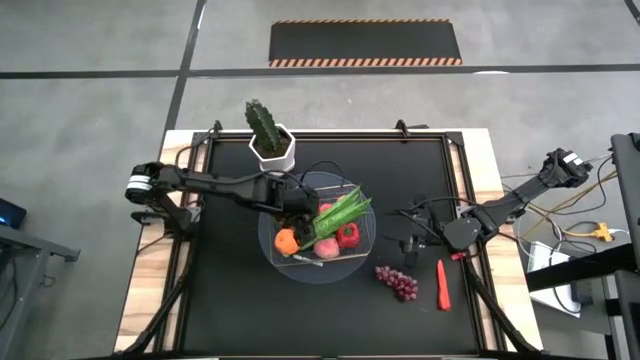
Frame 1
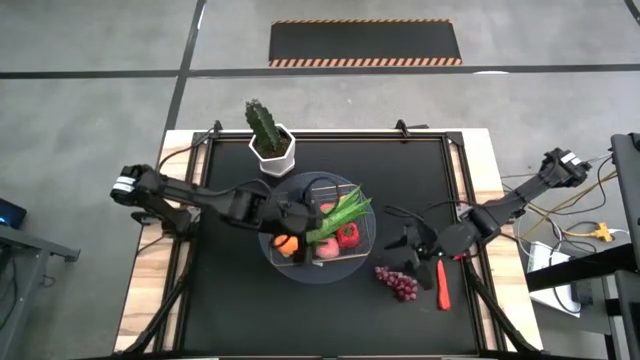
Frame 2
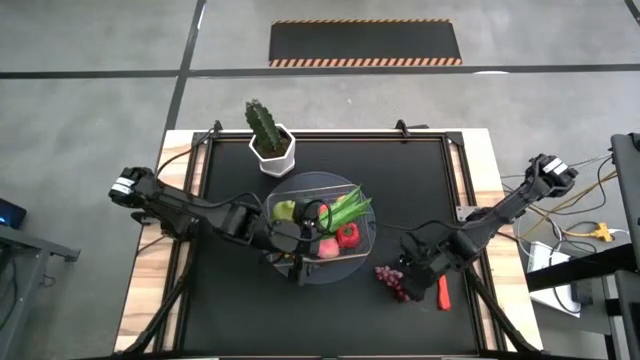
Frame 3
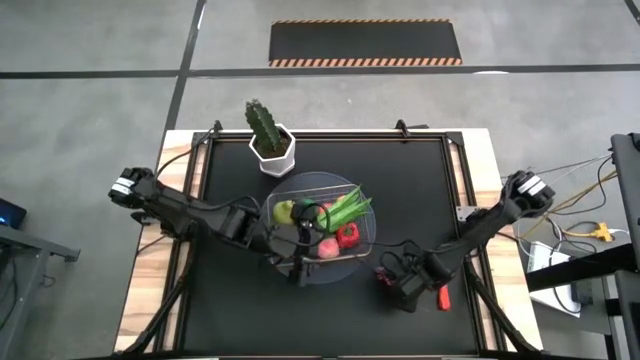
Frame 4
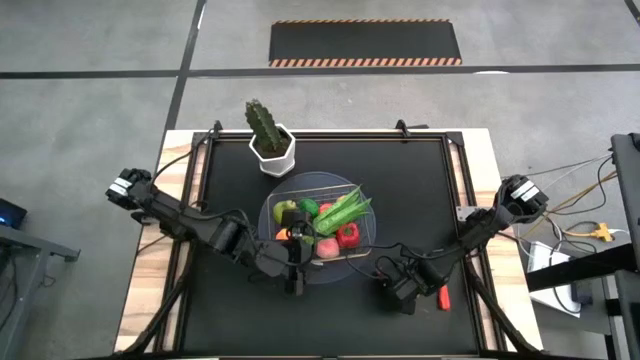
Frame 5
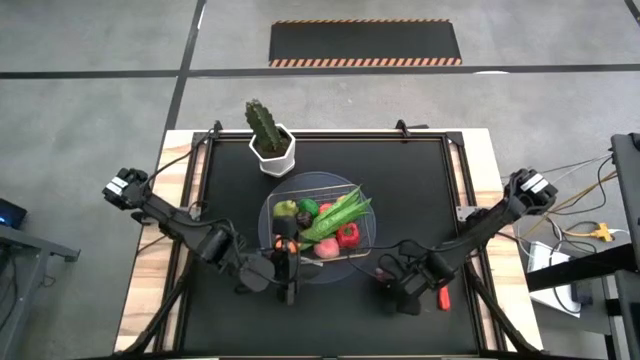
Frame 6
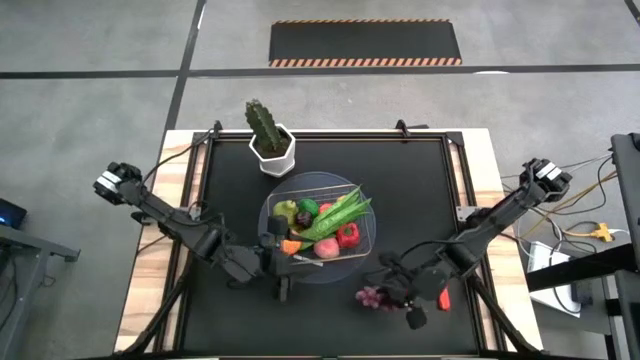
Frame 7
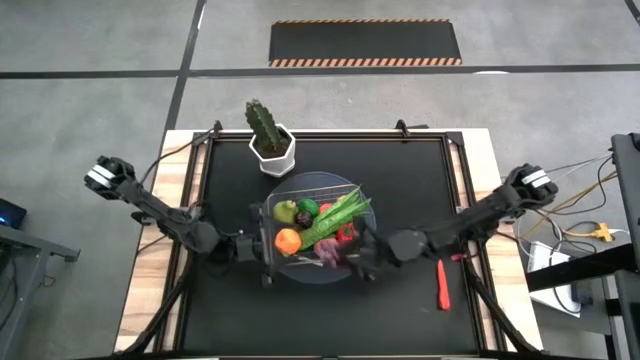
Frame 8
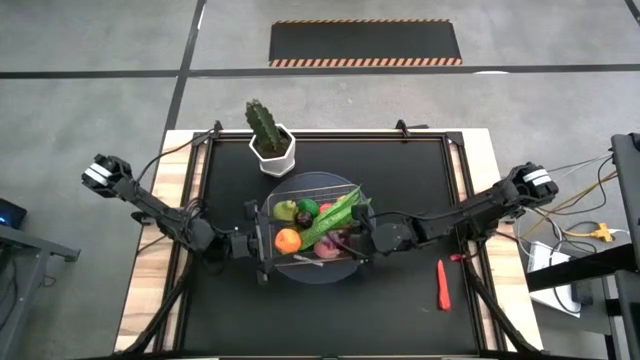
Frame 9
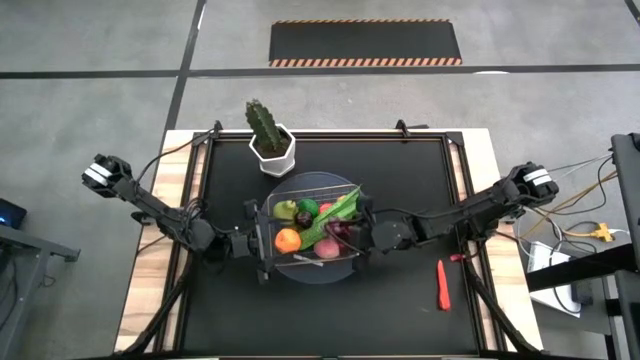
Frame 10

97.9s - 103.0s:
Task: Build produce basket
Put the grapes into the wire basket

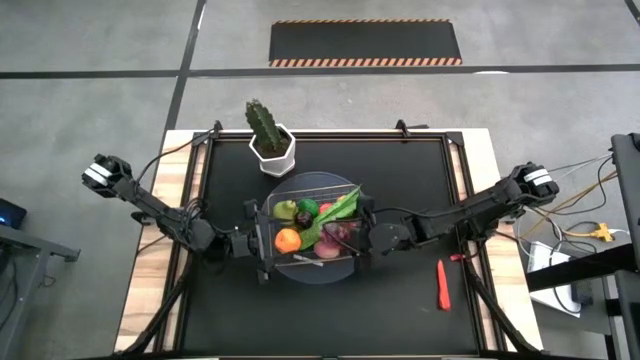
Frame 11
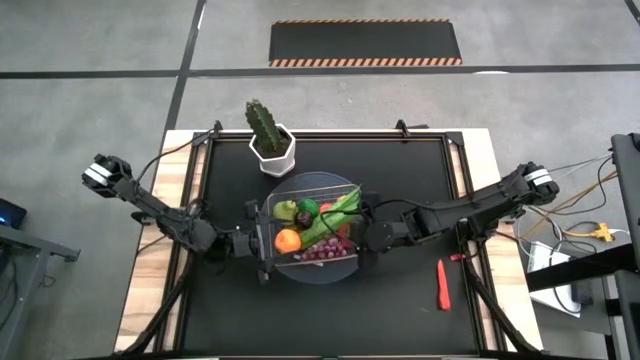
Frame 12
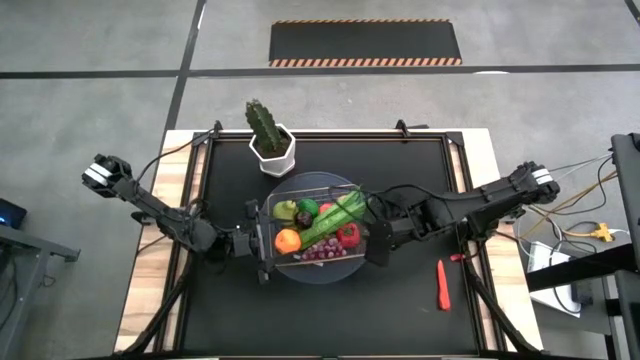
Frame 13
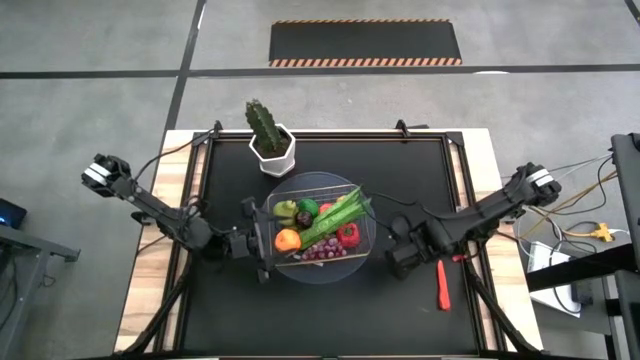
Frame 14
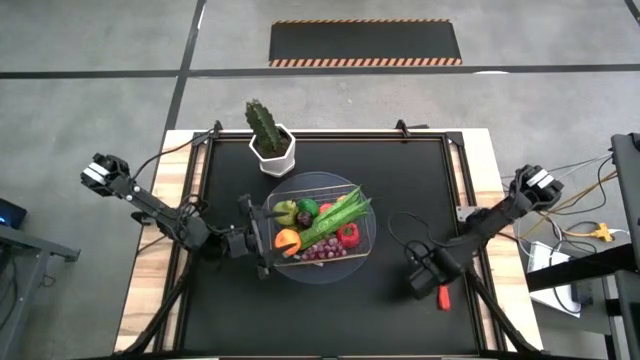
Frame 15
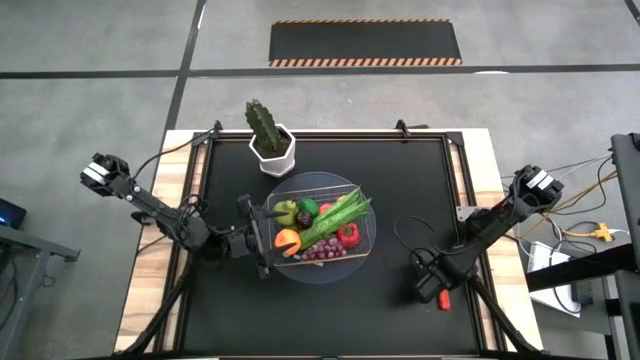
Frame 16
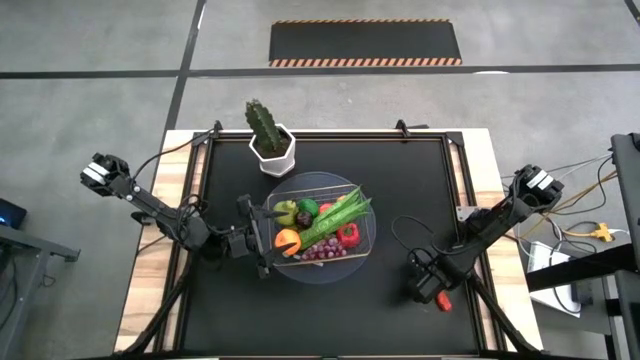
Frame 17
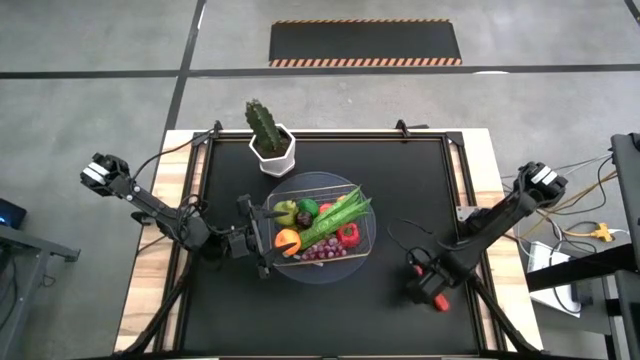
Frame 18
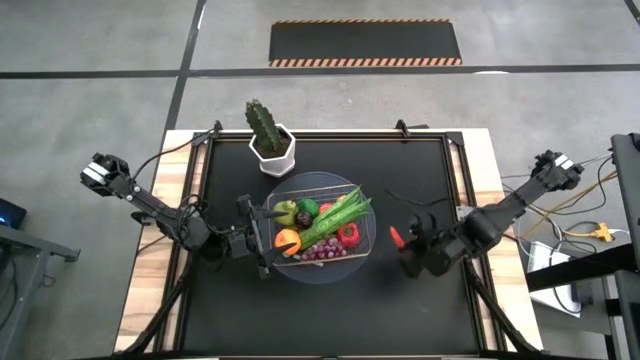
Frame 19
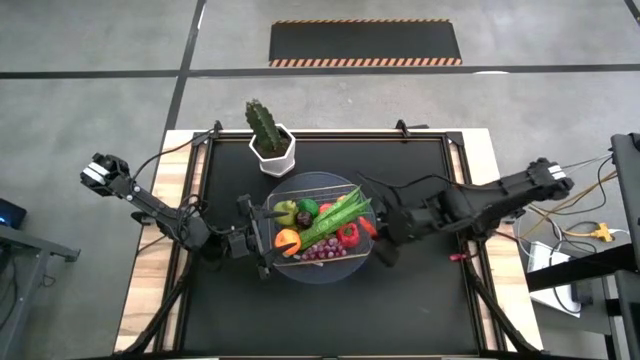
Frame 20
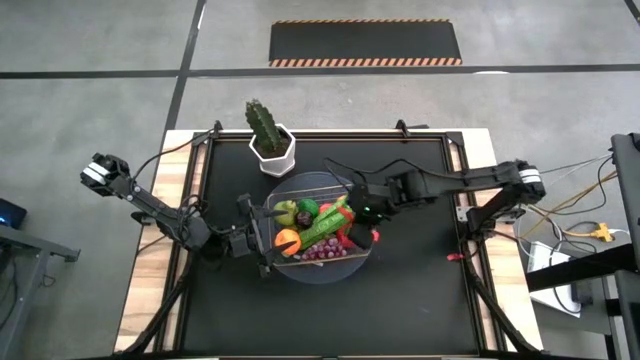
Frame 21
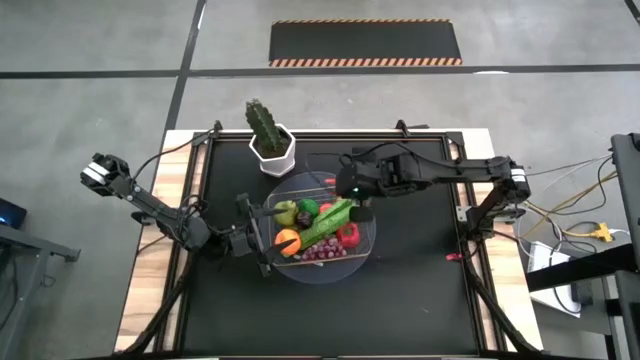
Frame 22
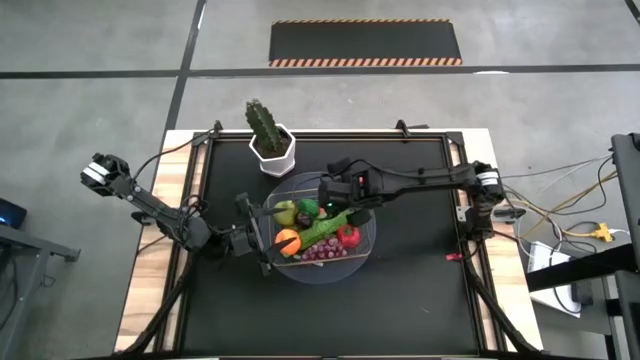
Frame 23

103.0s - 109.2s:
Put the carrot into the wire basket

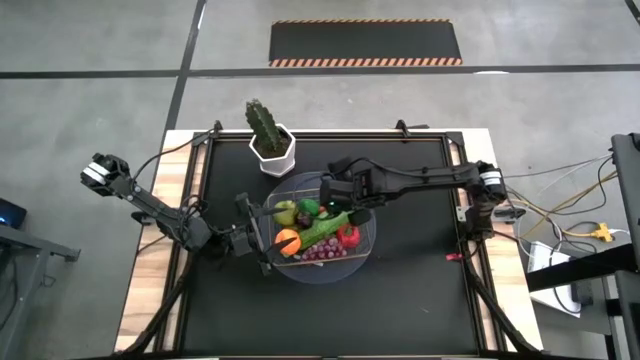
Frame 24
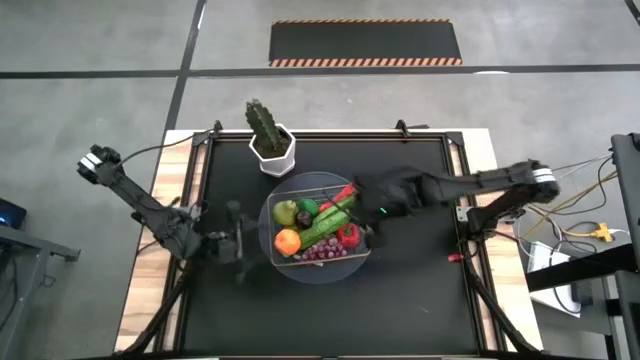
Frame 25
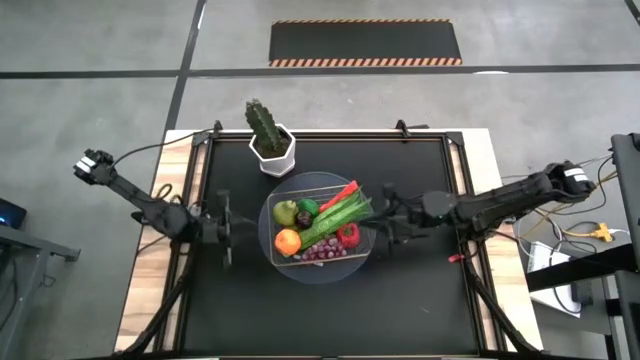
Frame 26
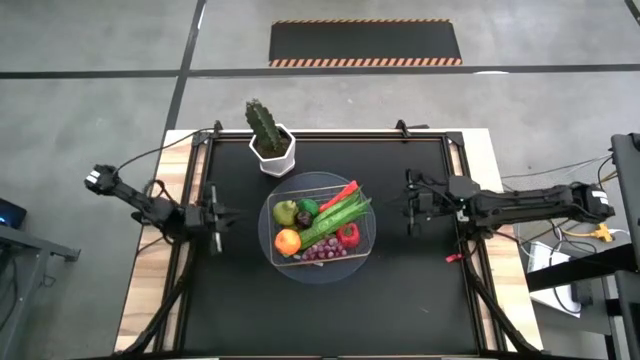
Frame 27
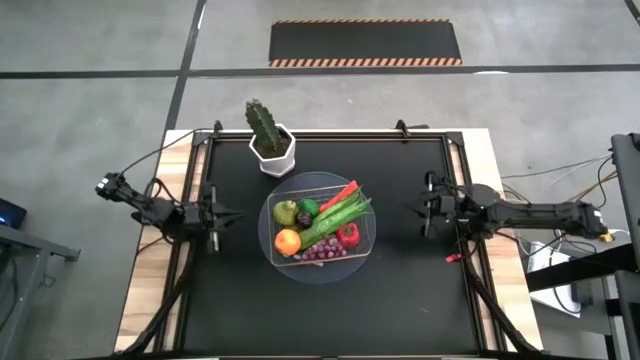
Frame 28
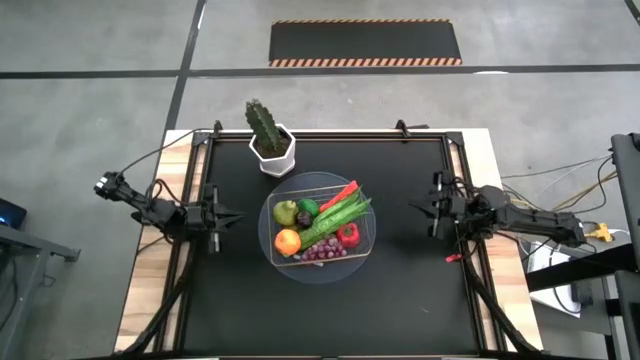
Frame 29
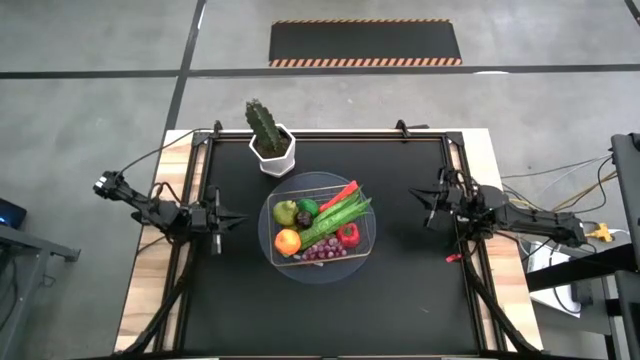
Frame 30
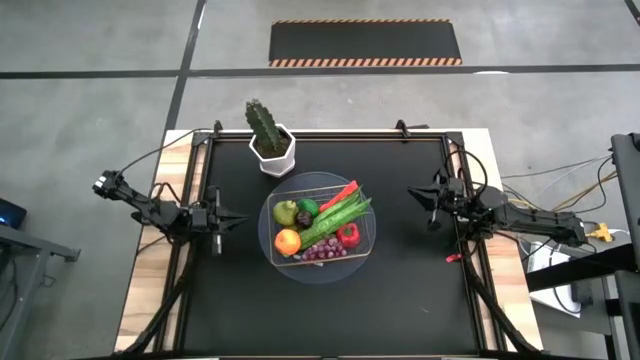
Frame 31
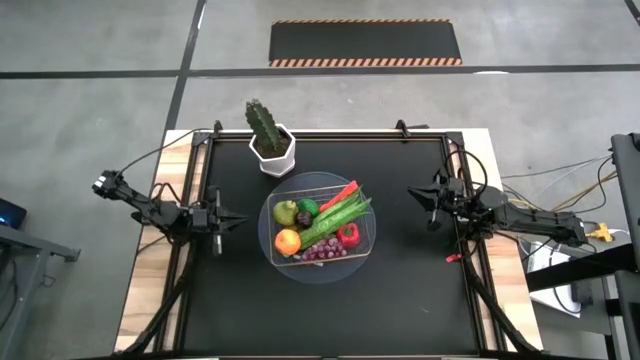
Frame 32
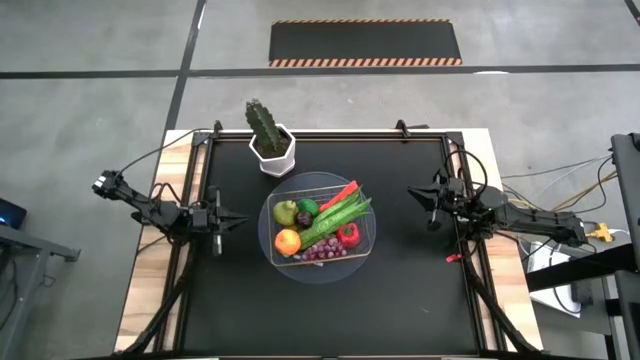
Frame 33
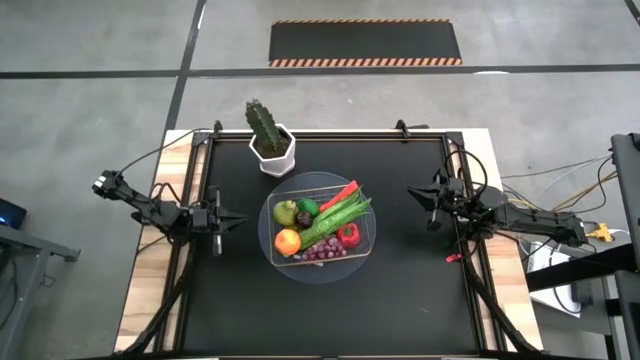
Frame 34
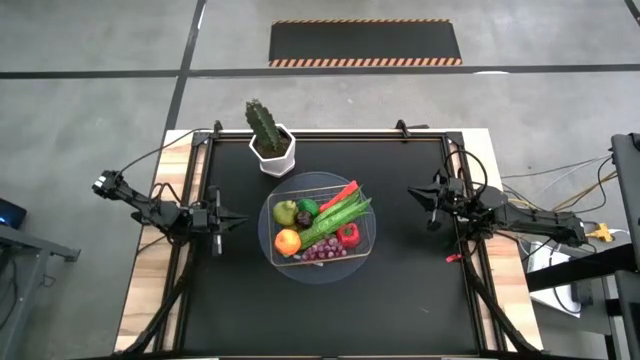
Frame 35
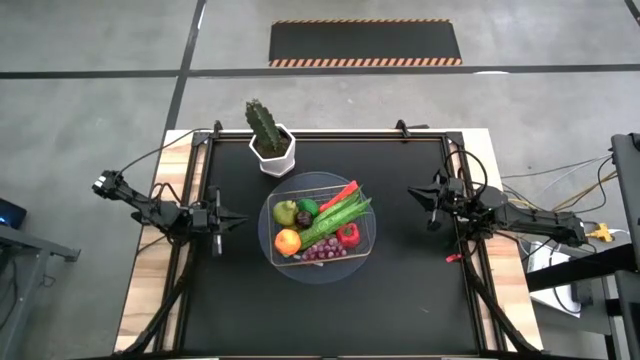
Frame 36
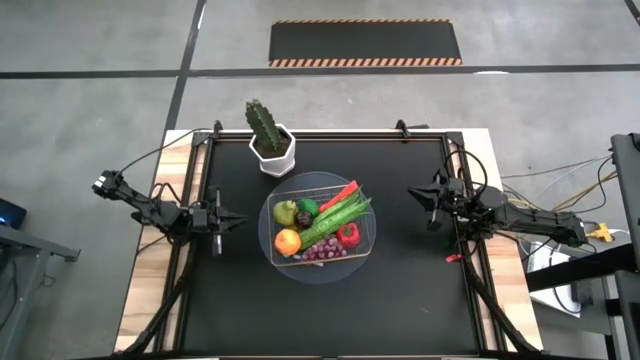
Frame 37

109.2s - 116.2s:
Return to Home Position

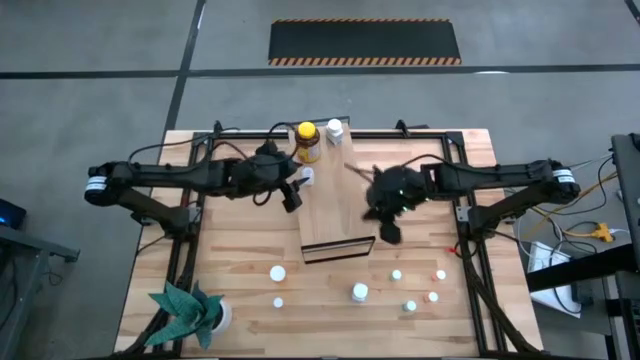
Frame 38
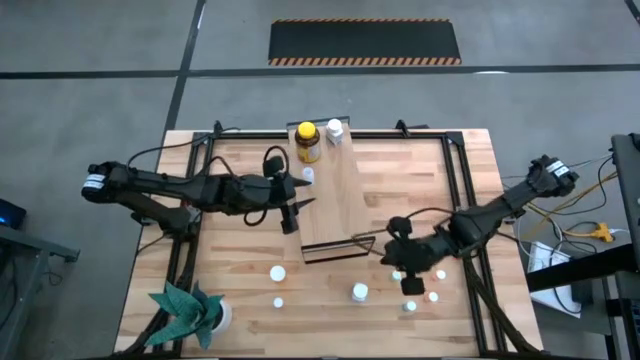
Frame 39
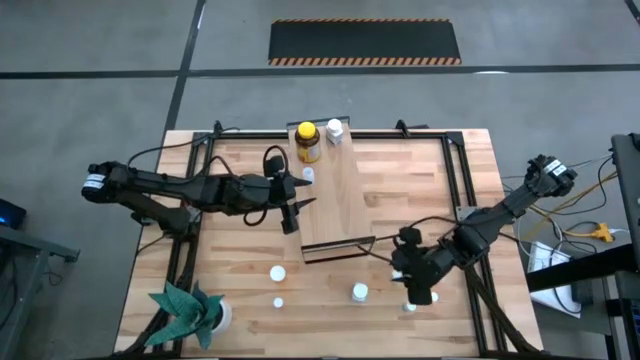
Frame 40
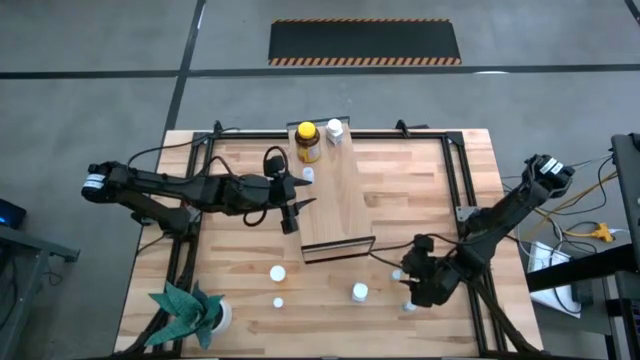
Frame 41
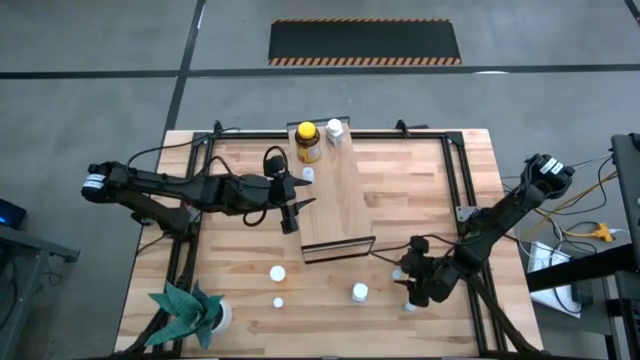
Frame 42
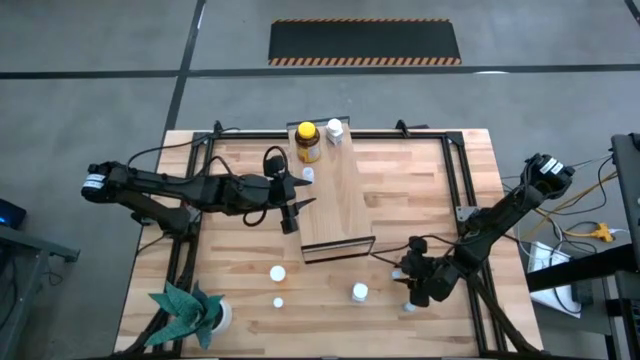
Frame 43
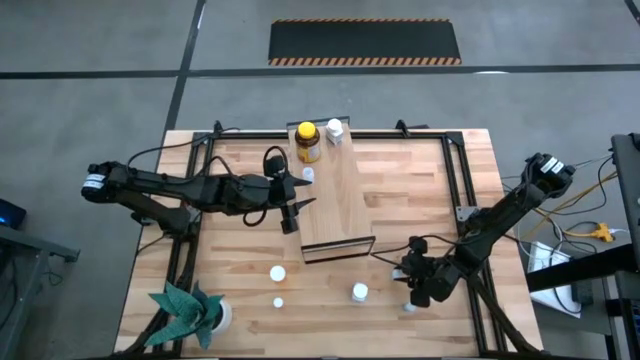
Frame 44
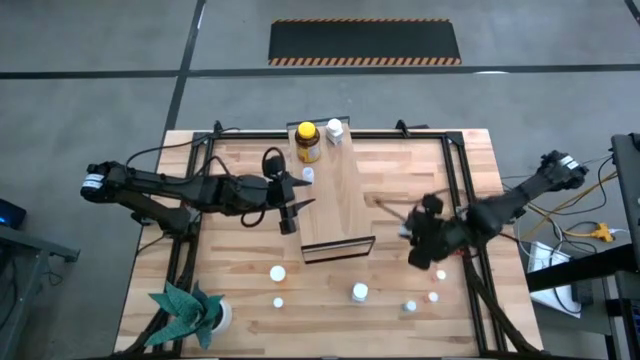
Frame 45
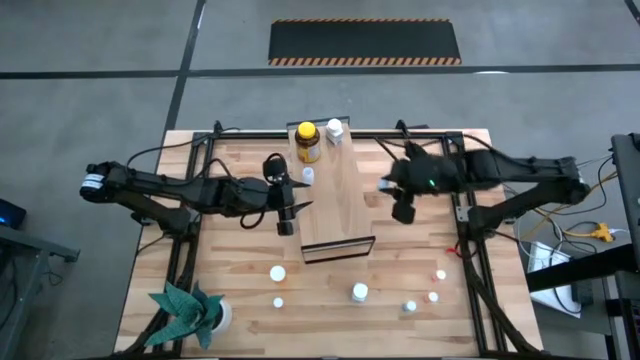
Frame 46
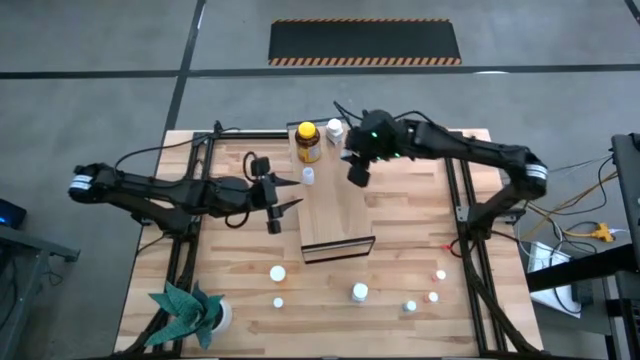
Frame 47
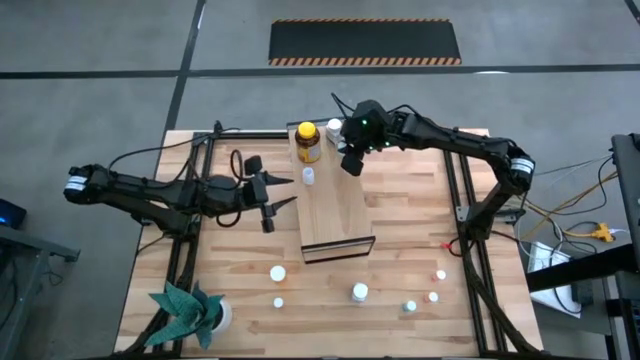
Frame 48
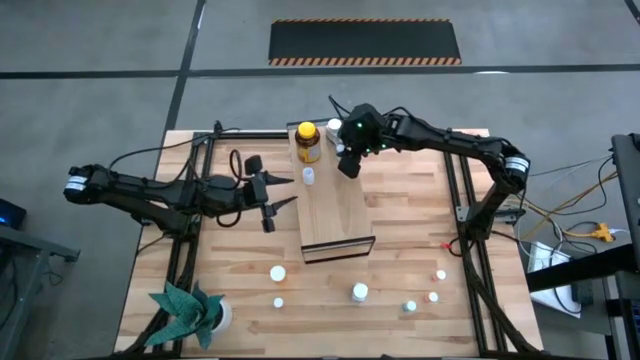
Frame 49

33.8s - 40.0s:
Task: Pick and place medicine bottles onto shelf by color
Put the top blue pill bottle on the shelf
